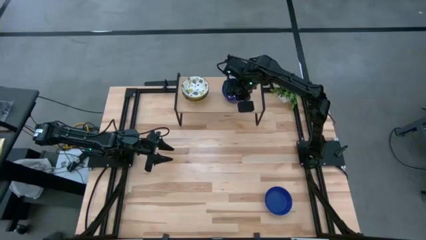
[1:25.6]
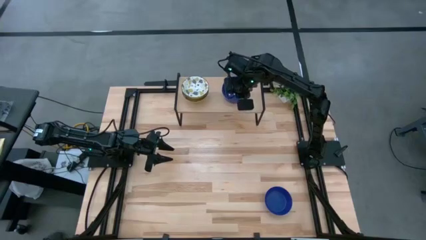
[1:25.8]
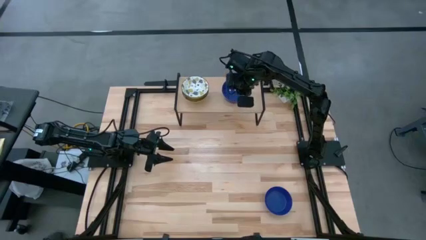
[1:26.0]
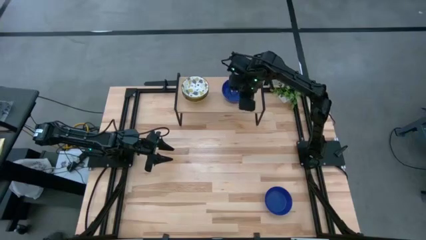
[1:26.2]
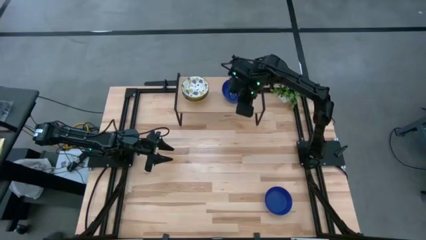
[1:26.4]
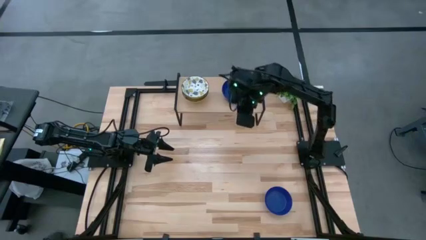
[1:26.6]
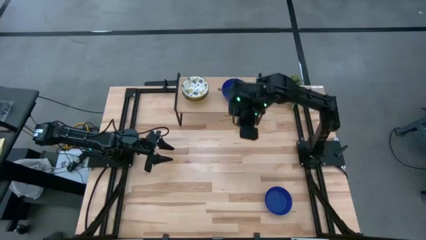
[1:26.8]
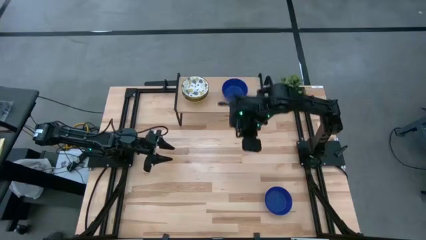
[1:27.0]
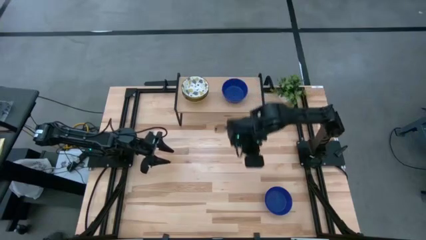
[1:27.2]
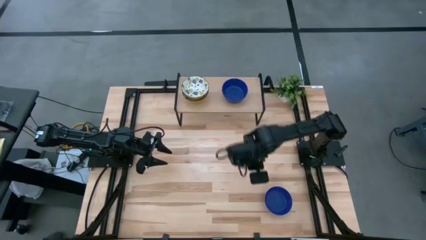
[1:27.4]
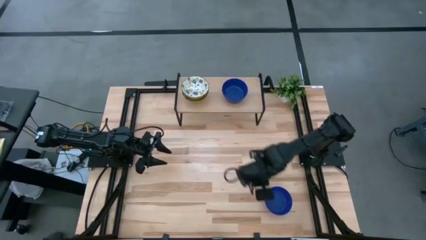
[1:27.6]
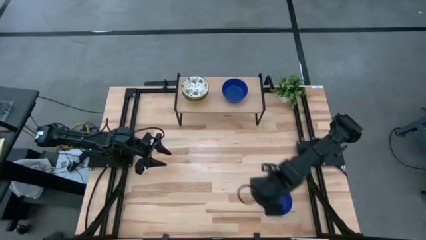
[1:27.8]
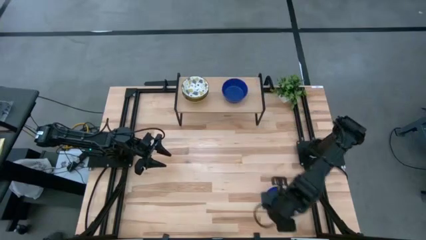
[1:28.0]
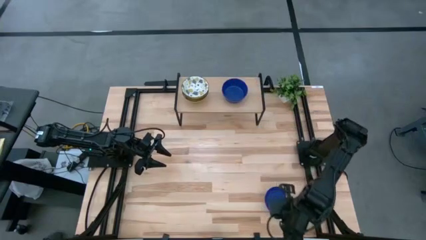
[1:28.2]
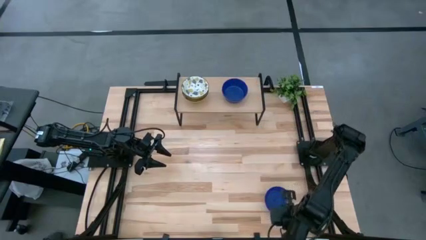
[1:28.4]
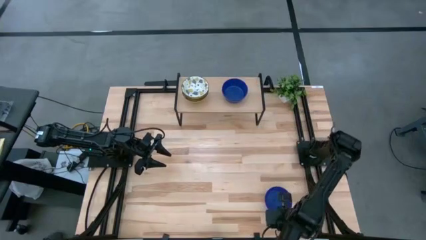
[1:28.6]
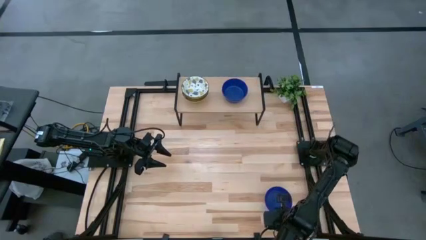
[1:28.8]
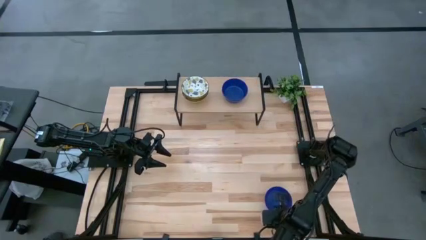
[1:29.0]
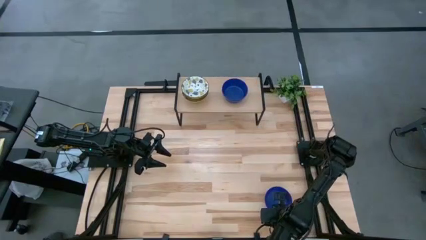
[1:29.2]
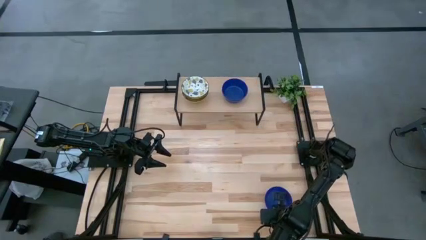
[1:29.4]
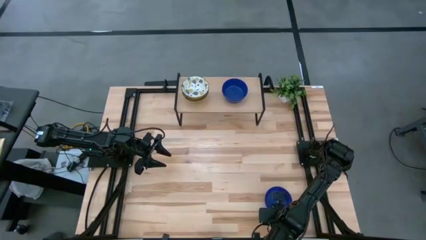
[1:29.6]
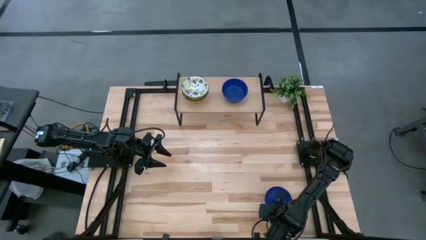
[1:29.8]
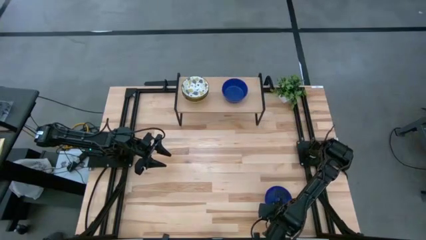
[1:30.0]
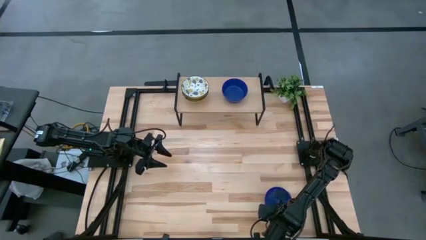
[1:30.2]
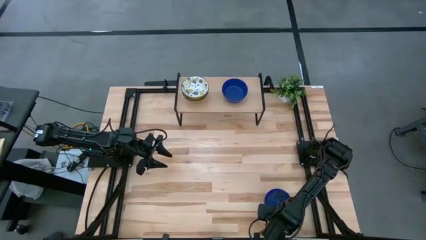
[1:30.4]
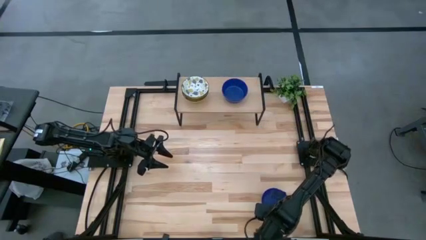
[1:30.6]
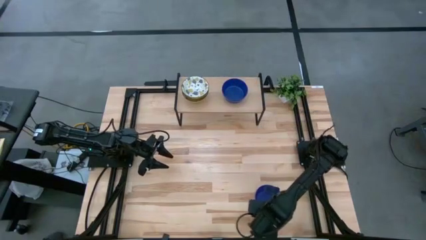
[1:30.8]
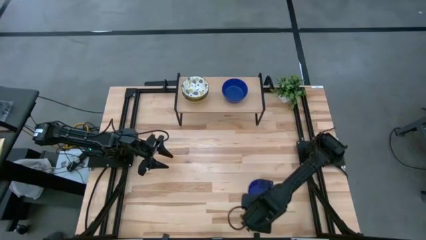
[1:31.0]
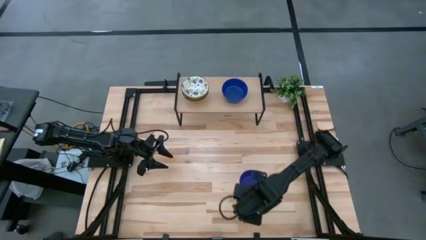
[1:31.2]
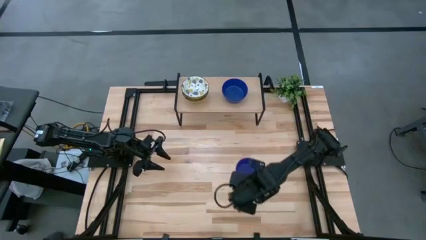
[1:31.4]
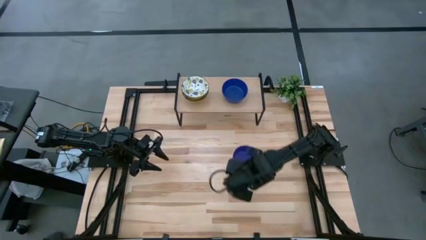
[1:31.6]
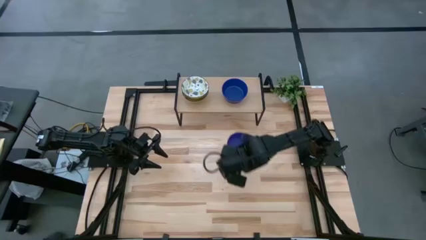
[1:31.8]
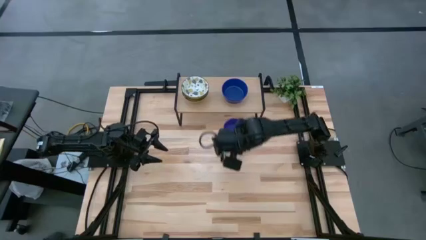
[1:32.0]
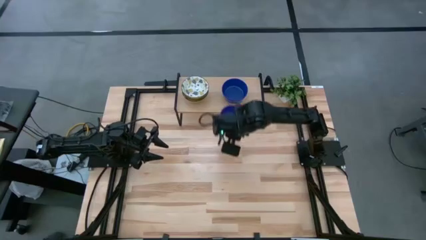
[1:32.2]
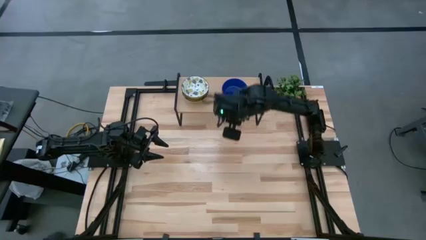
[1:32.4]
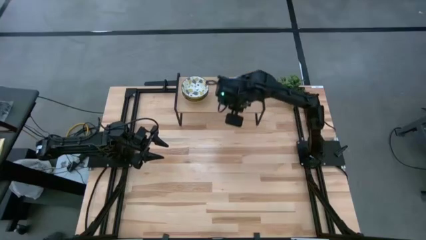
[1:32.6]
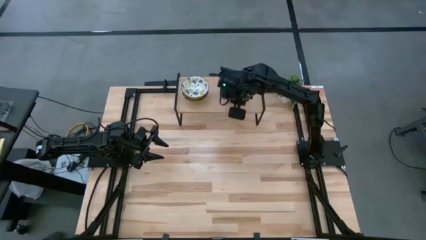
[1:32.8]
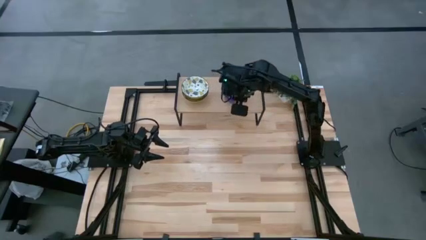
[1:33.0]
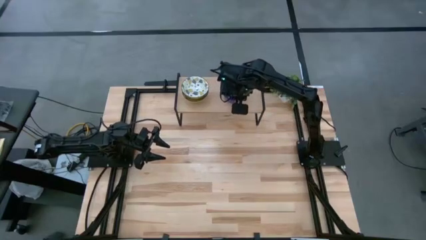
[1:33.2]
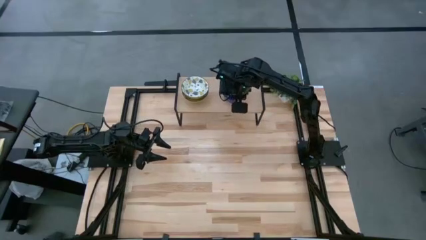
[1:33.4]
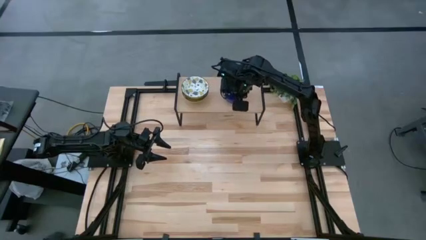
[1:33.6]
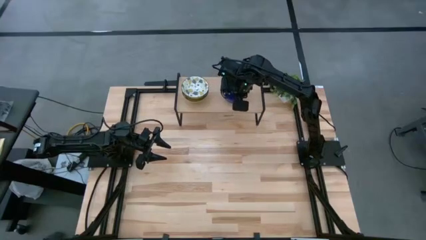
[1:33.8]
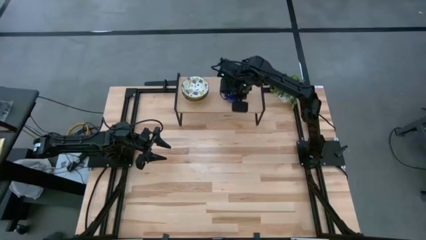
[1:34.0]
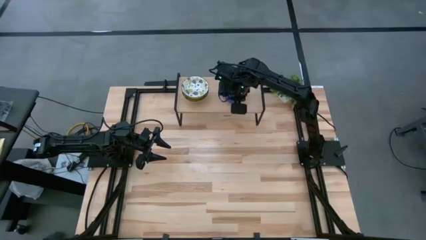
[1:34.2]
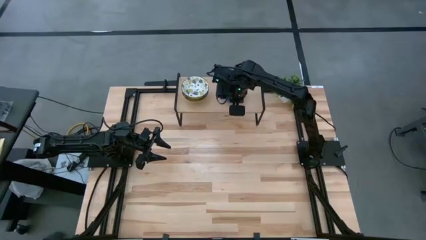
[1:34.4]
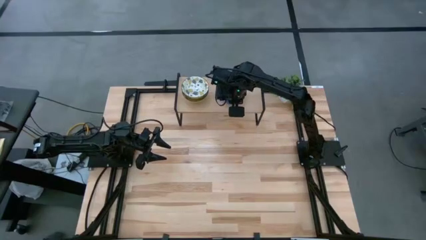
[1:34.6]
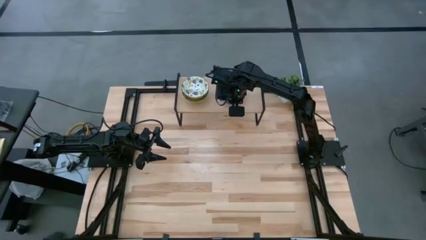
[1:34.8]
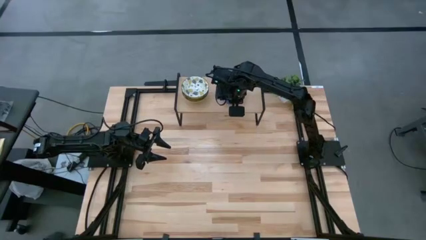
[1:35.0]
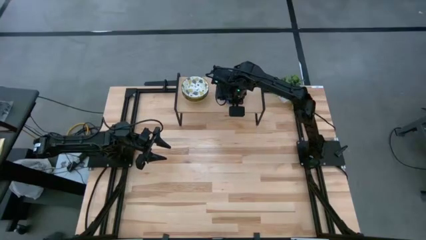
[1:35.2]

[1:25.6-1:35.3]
Task: Pick & Place Mini bowls
Stack the blue bowl on the blue bowl on the shelf

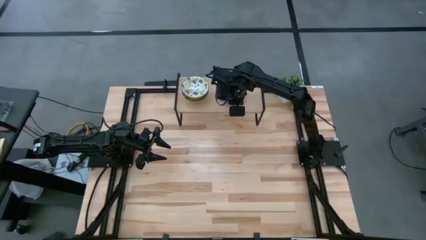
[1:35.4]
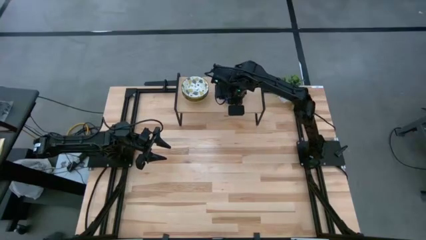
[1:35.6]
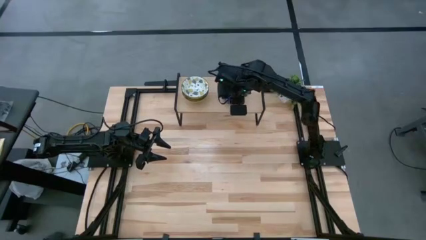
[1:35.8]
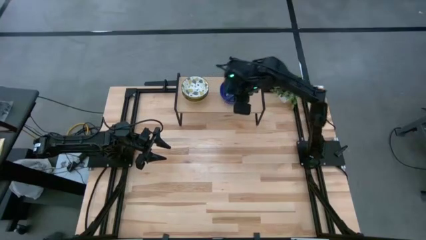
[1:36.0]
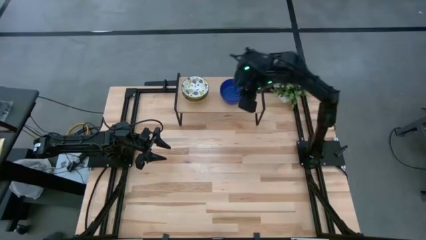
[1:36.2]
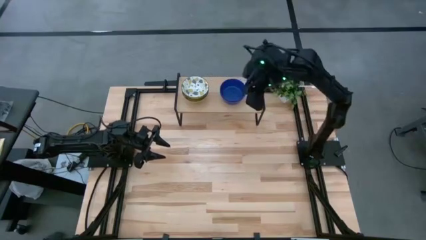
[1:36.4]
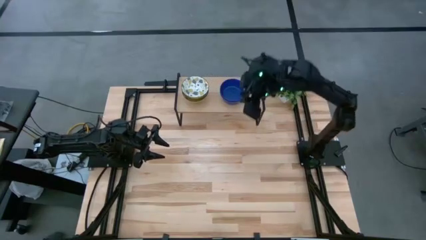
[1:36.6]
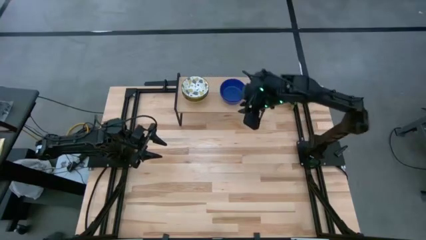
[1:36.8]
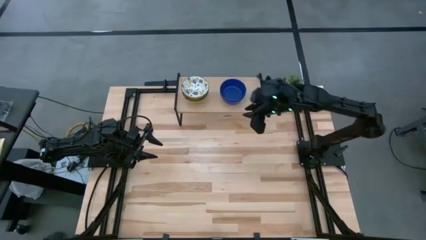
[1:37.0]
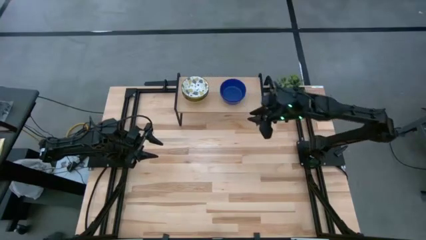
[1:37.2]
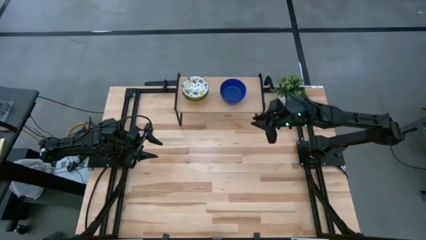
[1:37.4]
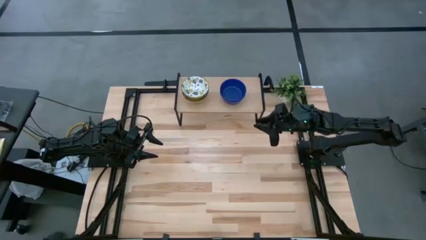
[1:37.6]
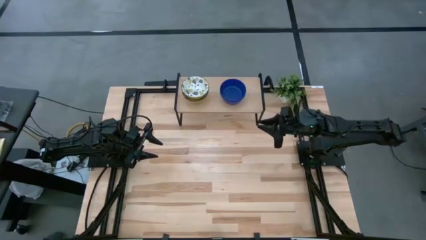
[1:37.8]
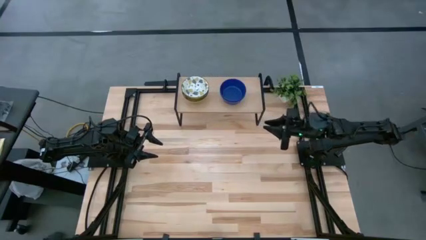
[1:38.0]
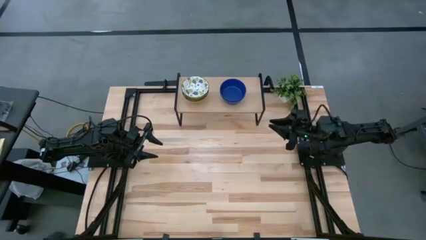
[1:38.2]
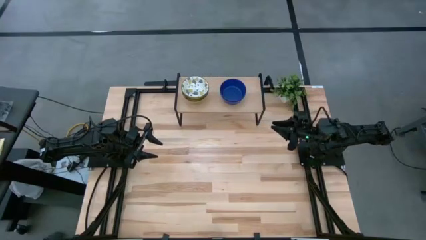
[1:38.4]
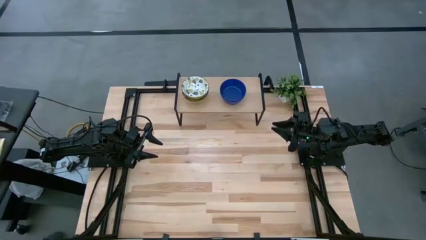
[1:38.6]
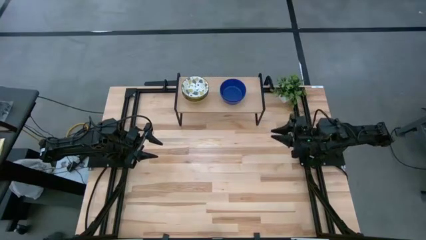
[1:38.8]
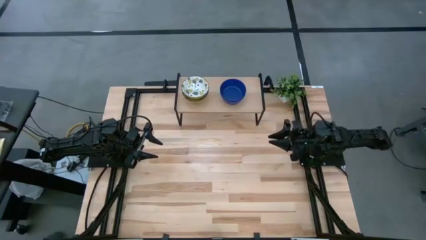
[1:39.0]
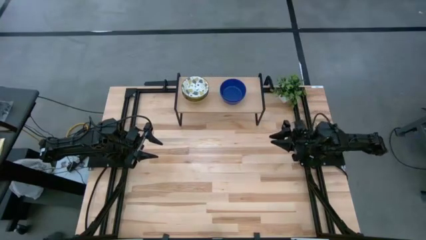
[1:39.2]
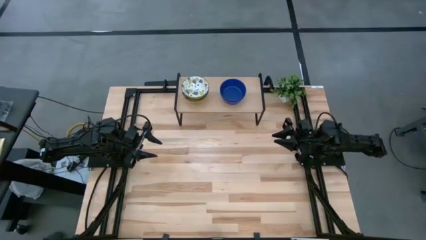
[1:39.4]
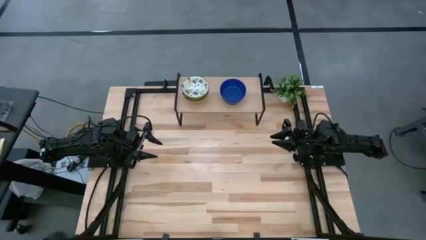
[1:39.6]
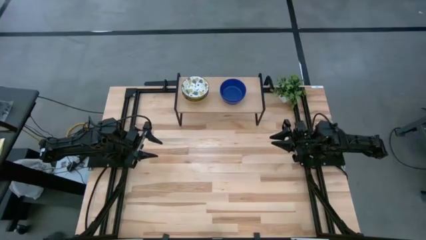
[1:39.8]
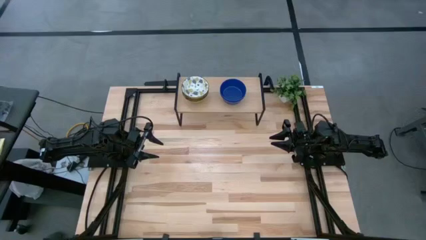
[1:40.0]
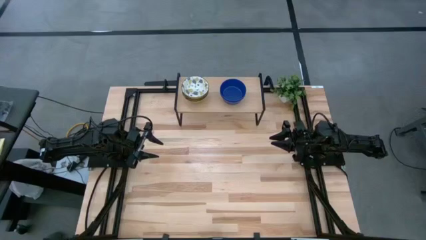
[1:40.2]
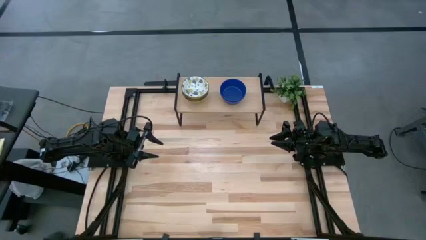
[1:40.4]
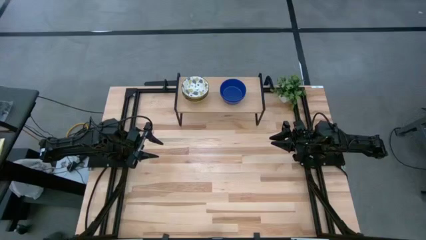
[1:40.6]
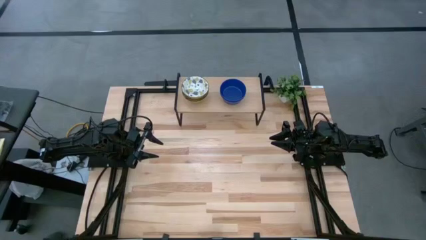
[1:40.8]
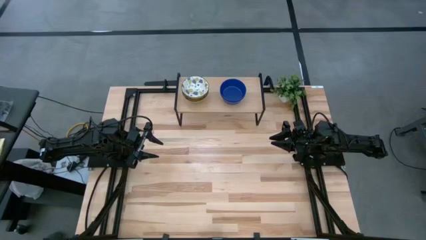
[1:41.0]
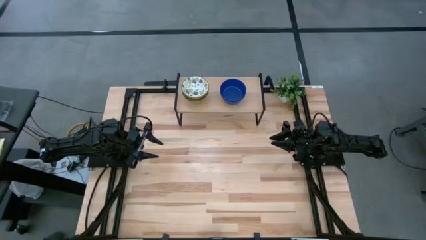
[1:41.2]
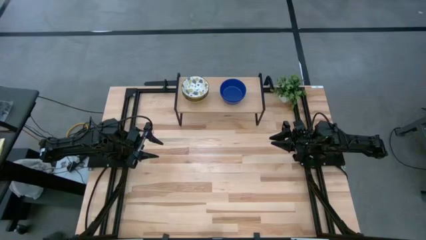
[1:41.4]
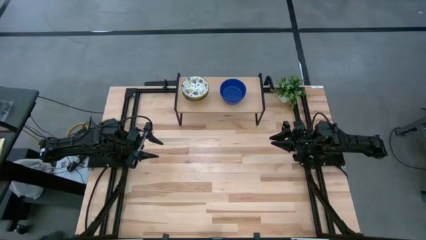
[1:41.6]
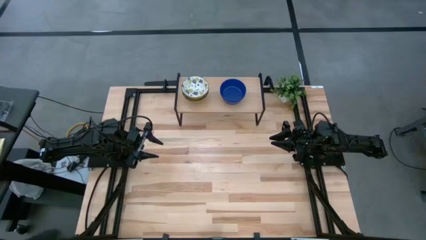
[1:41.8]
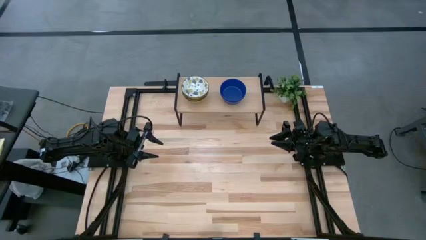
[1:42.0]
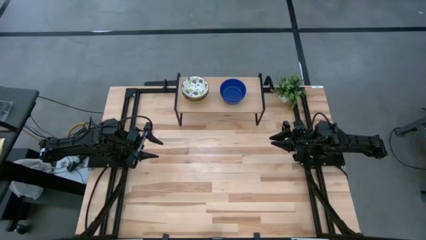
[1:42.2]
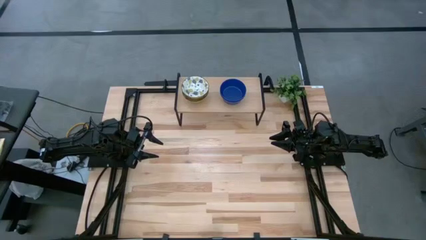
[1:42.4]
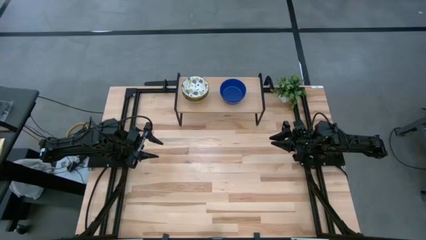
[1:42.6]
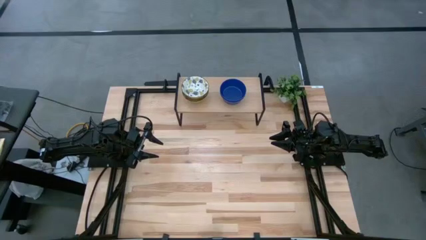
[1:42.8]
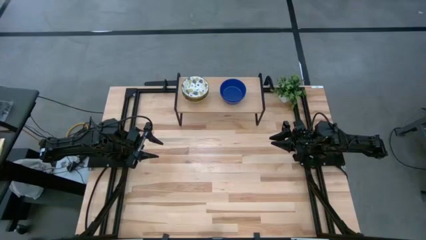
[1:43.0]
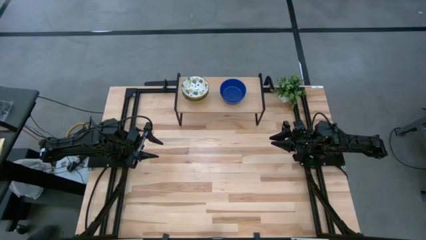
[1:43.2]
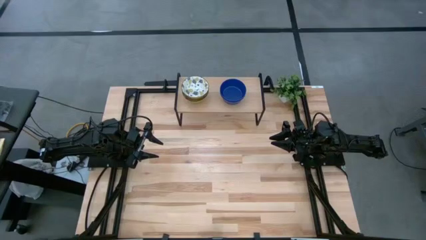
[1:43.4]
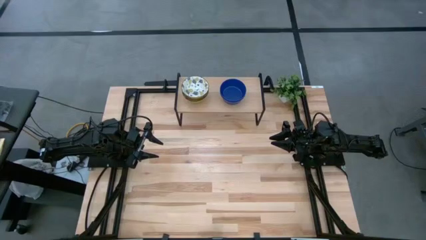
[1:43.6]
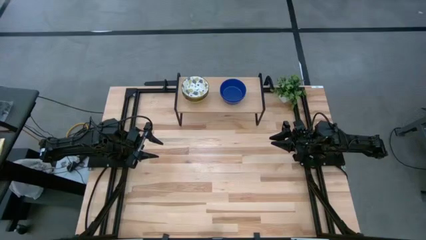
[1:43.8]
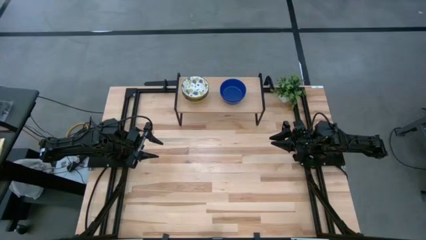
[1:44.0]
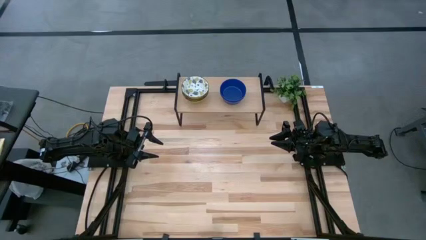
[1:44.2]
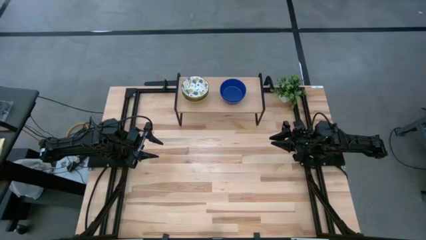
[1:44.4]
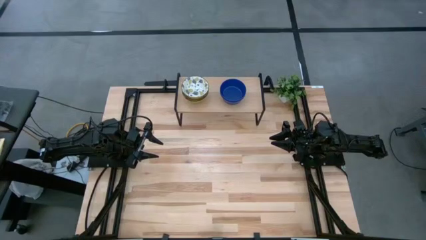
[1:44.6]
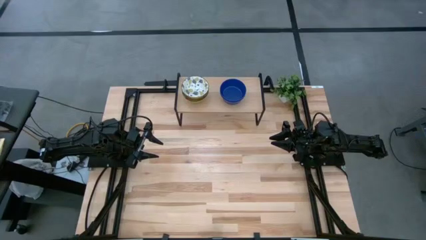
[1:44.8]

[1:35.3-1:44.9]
Return to Home Position
